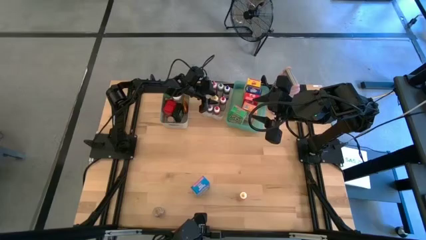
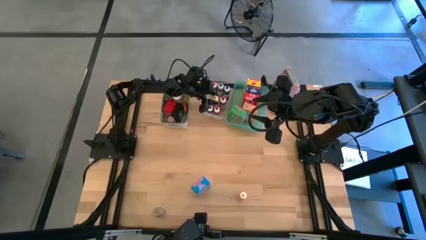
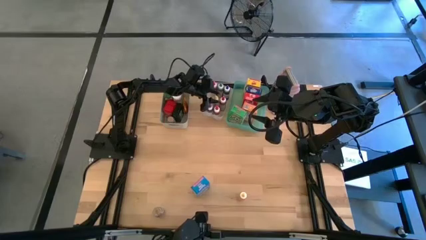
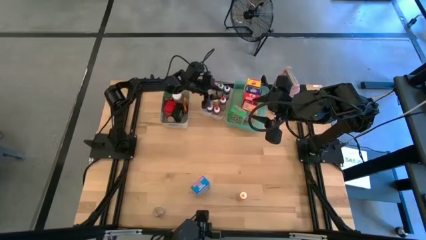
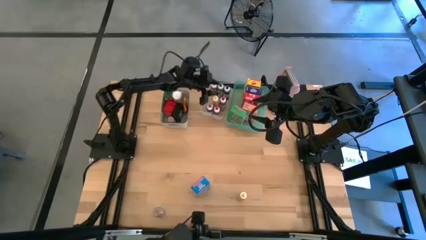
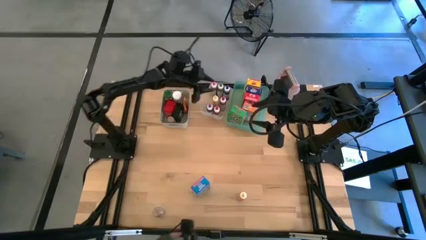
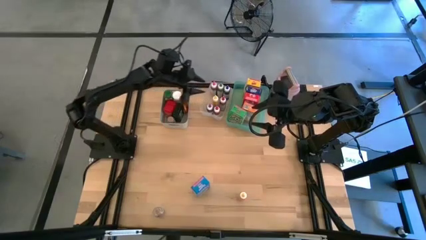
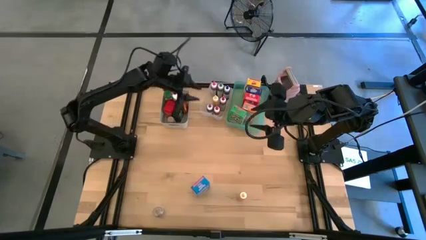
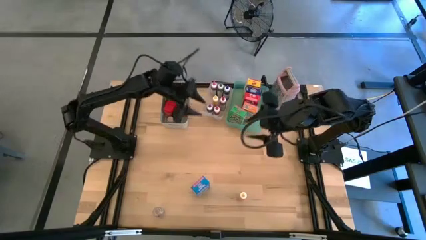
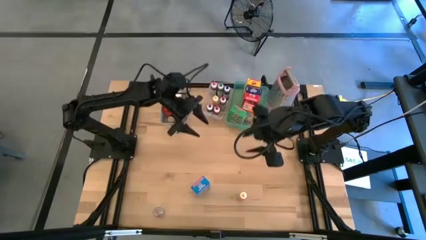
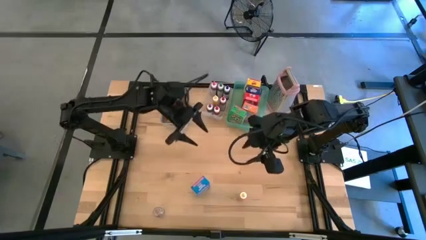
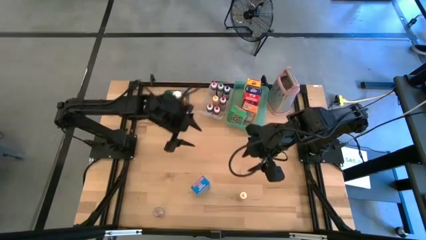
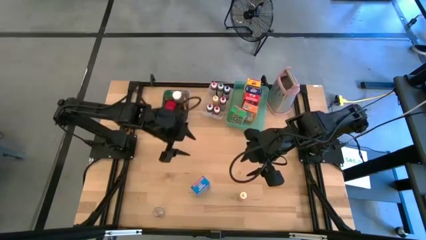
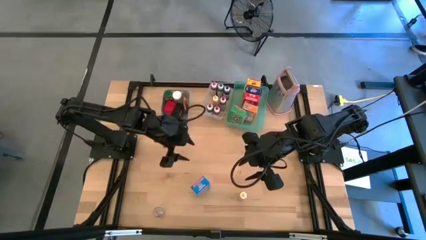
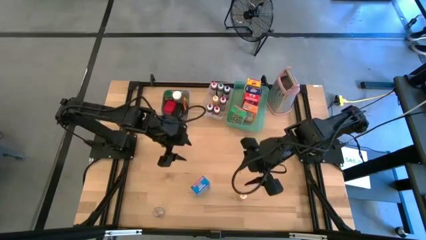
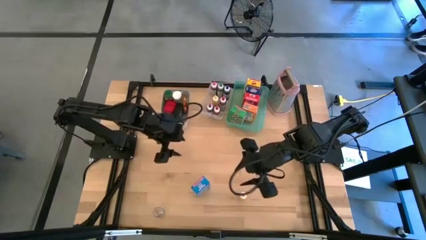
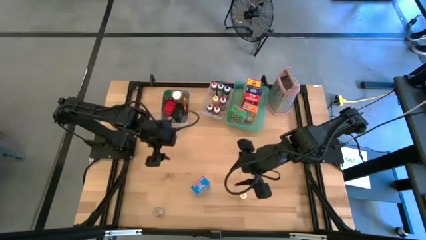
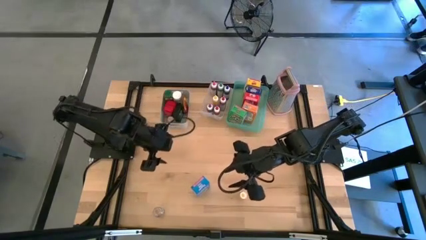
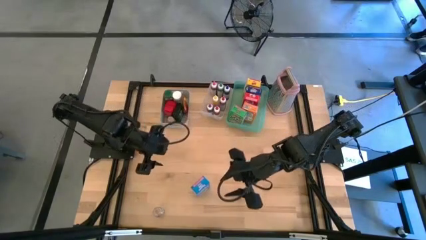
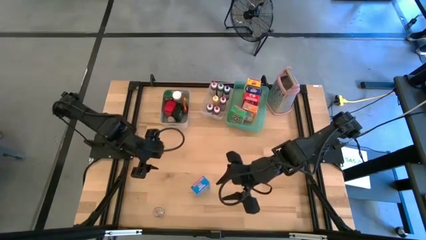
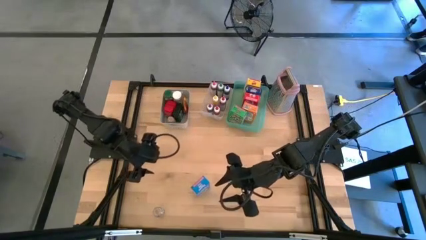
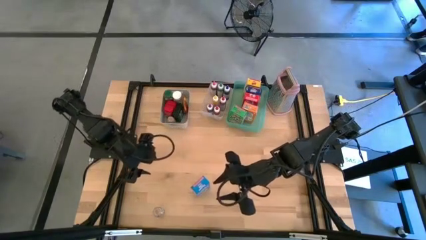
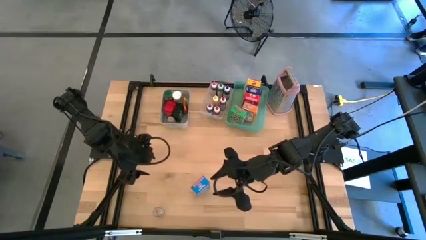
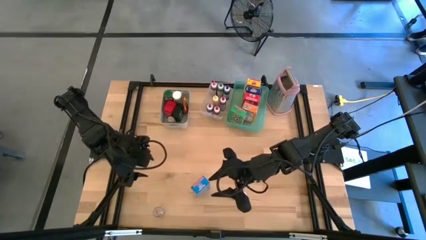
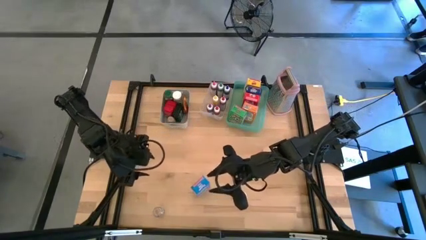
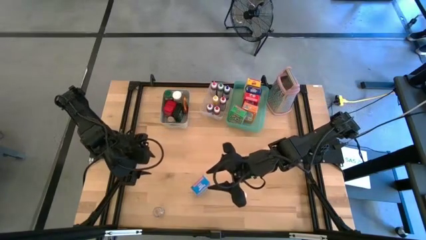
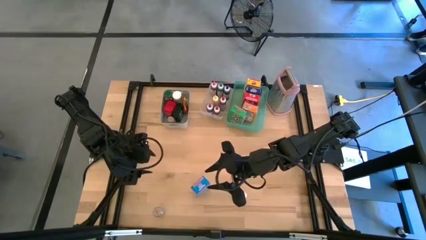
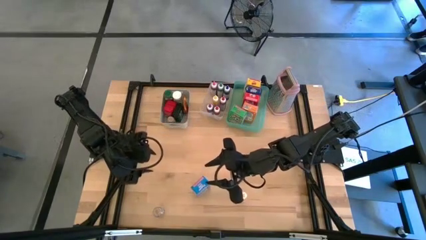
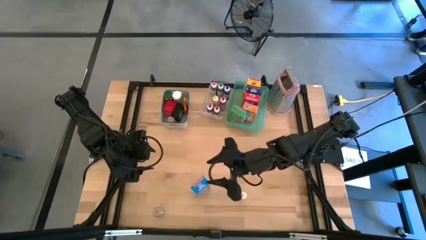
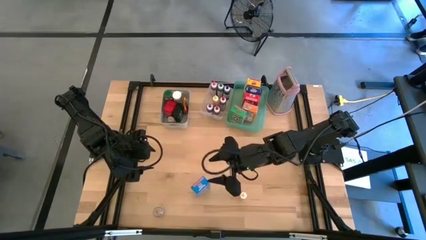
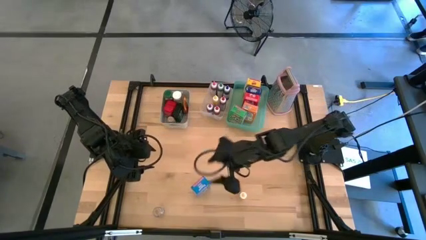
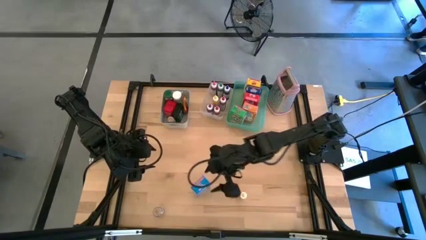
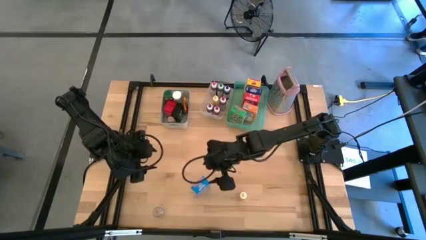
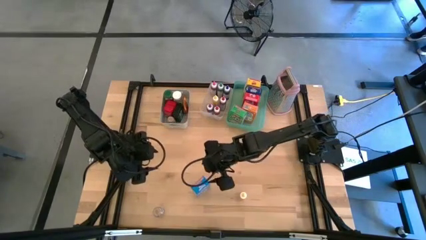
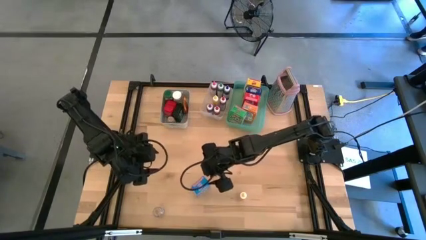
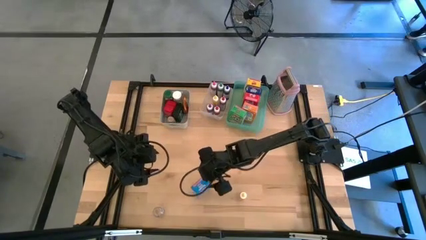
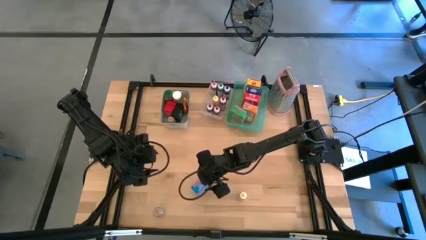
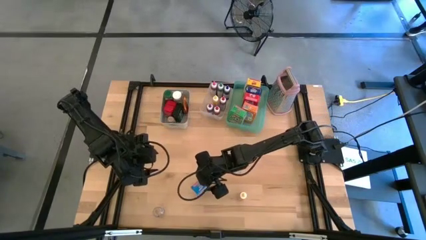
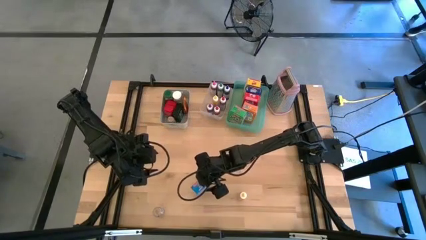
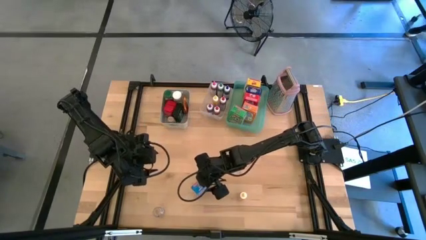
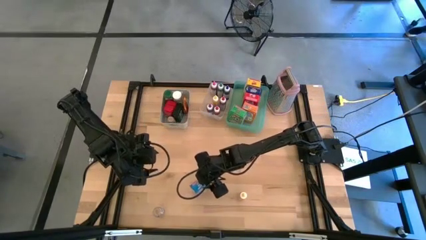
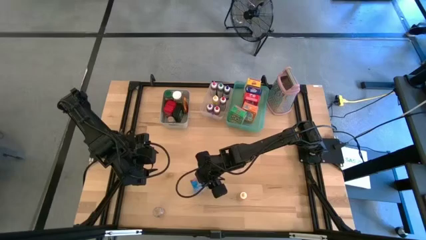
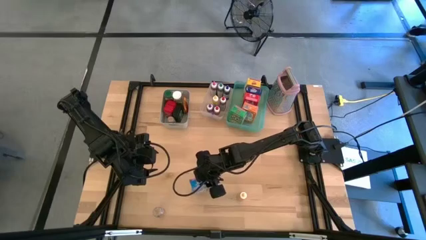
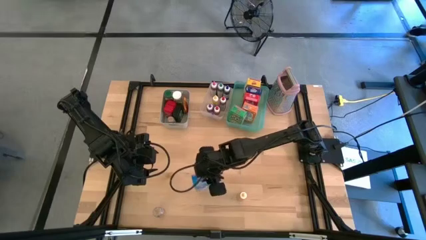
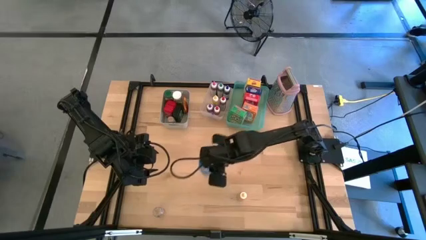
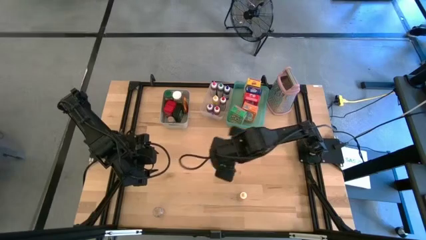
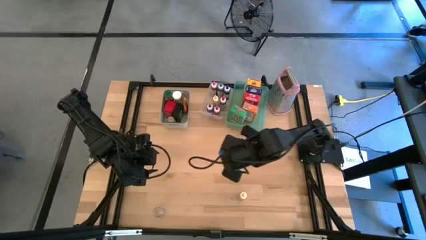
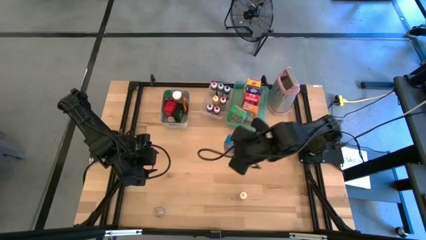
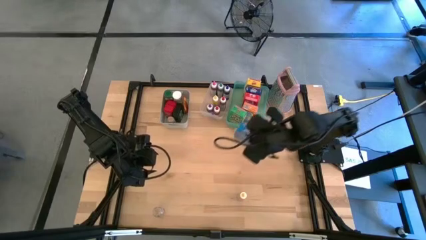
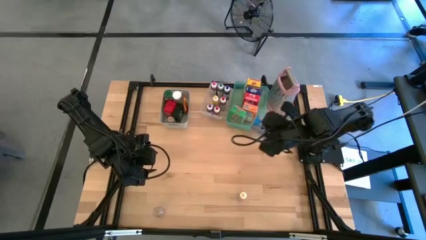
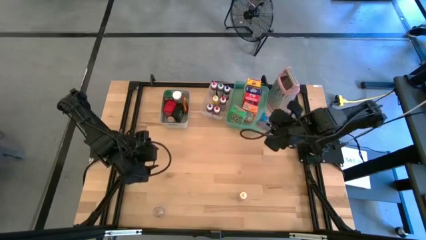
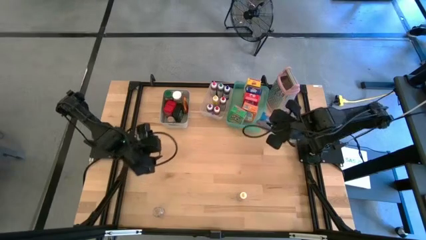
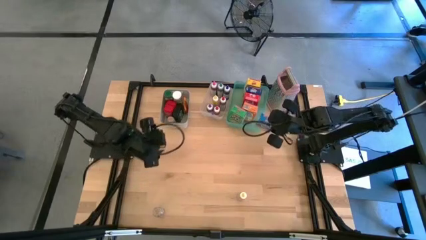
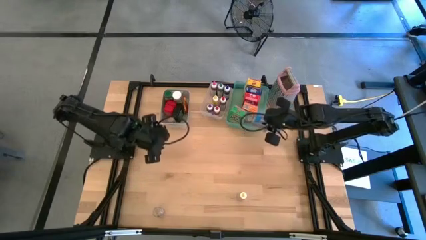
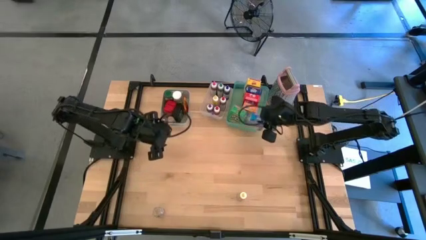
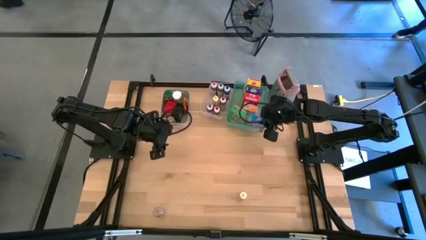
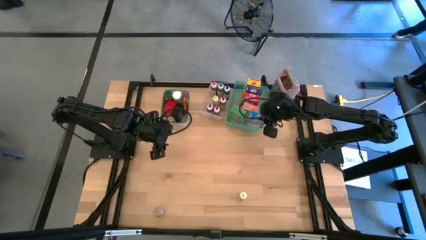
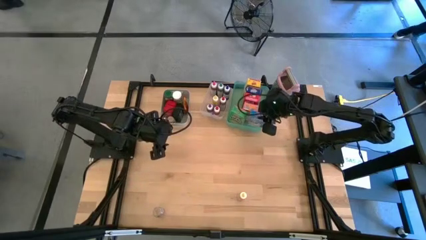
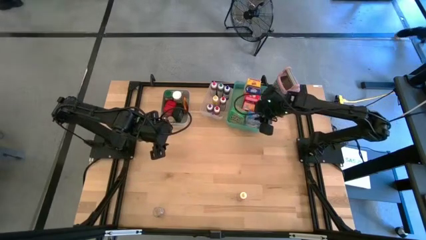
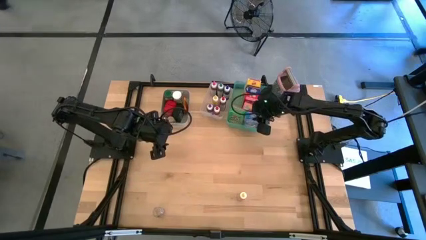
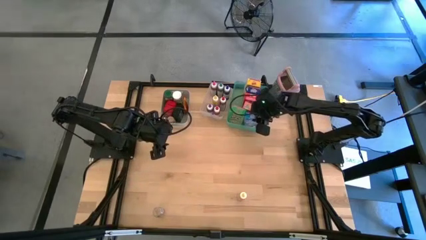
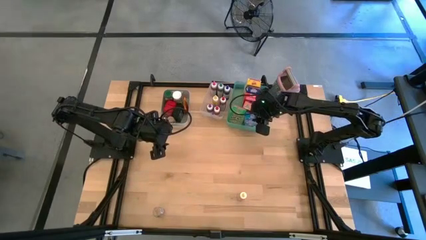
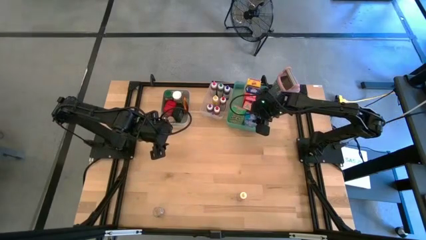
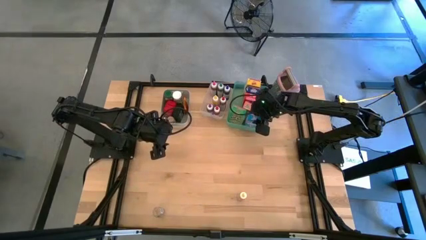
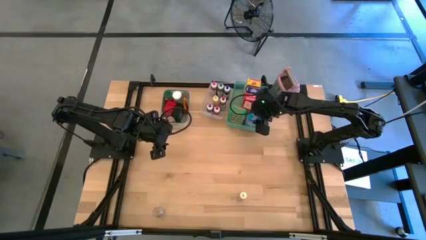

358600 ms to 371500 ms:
Task: Pick & Place Kitchen Items
Put the light blue cereal box into the green bin
